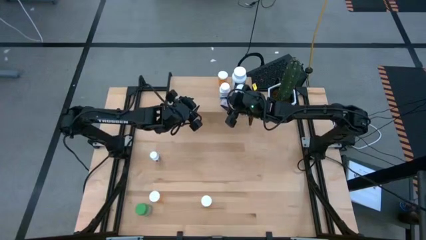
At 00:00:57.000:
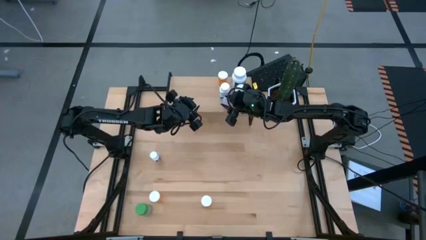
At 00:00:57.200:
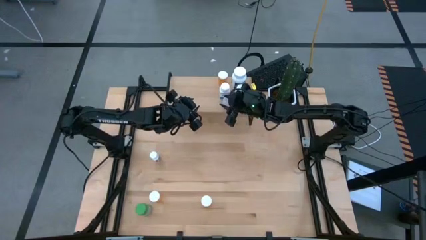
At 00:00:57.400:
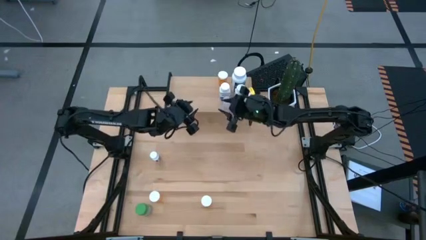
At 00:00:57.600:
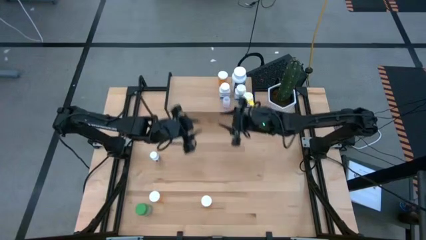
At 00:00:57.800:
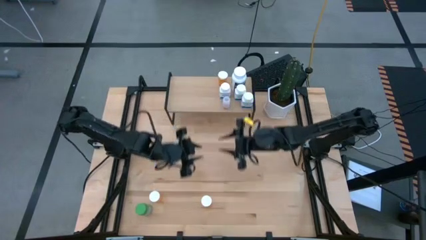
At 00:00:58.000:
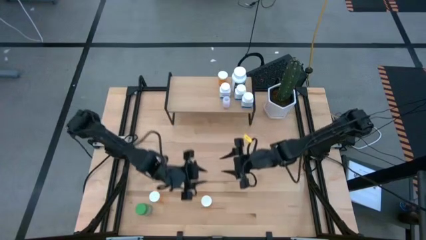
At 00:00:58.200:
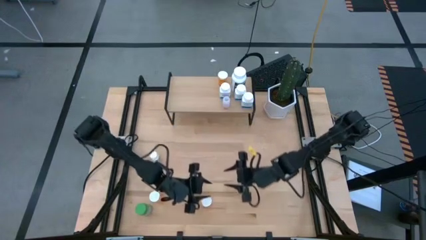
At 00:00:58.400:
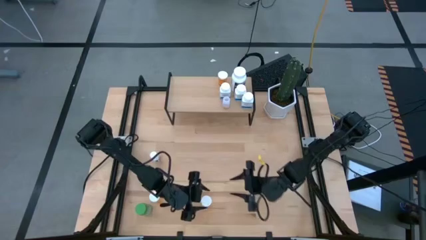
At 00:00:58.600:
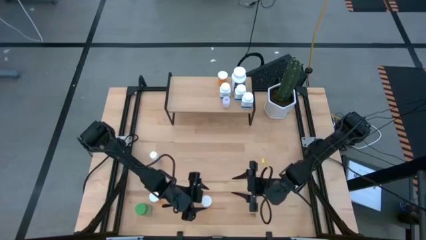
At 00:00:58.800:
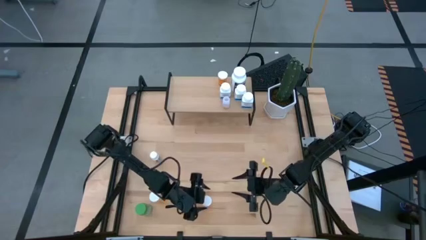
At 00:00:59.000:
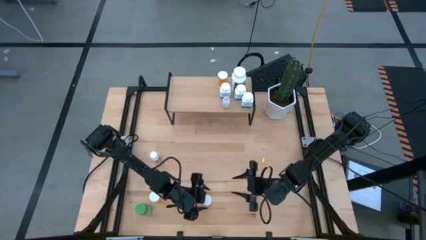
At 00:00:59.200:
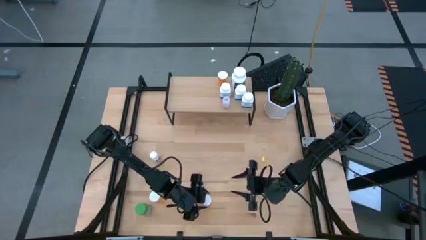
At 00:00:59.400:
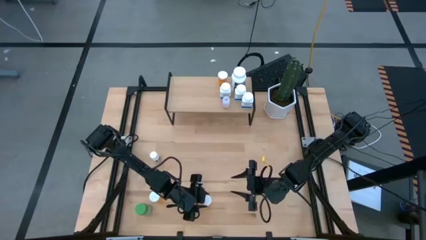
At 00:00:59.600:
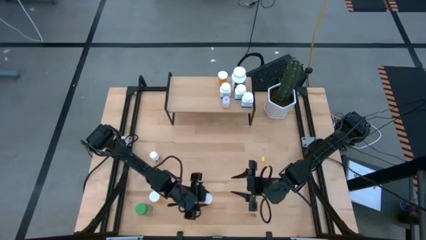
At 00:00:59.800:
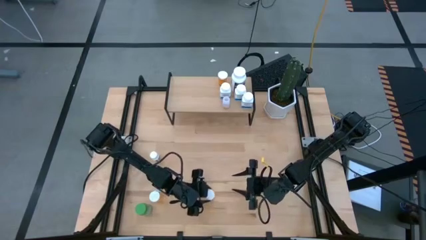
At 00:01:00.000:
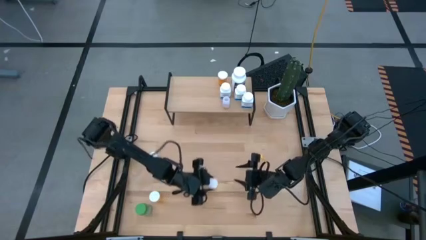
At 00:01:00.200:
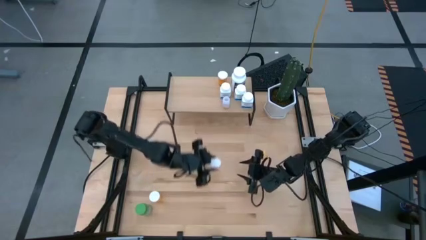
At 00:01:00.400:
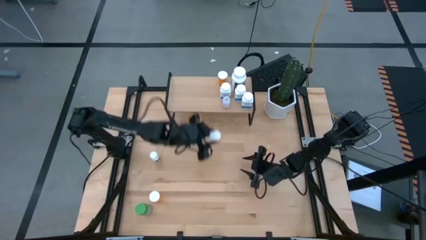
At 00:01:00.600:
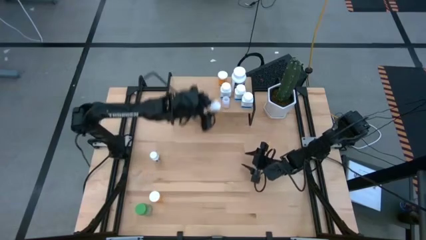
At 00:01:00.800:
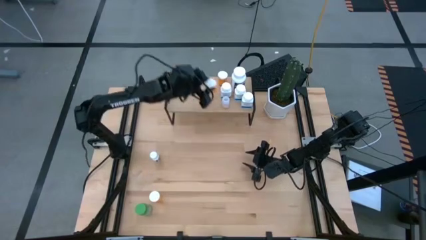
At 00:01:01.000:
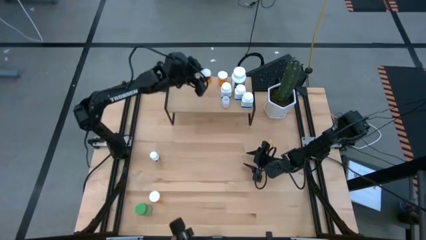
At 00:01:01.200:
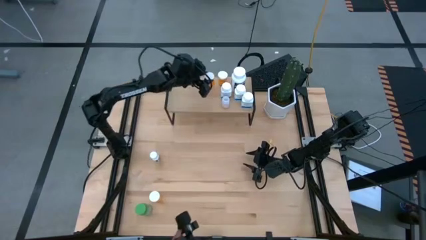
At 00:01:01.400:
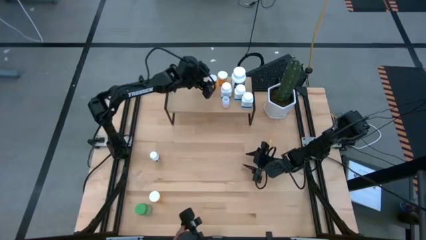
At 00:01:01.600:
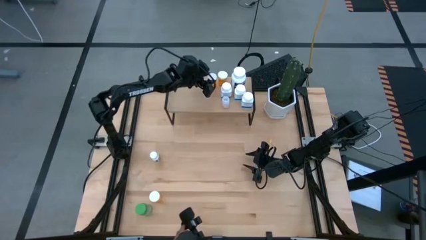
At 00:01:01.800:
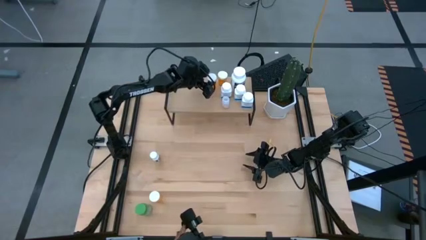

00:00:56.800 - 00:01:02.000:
Task: Pick and place medicine bottles onto shelf by color
Put the right orange pill bottle on the shelf

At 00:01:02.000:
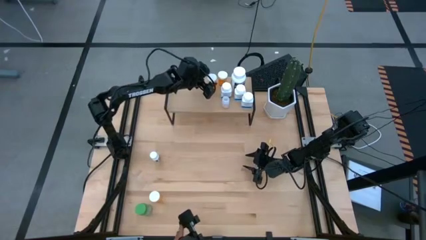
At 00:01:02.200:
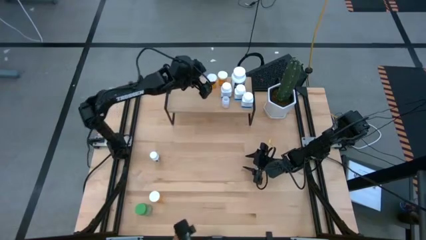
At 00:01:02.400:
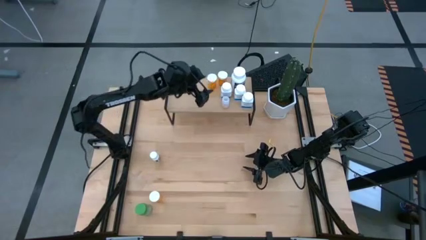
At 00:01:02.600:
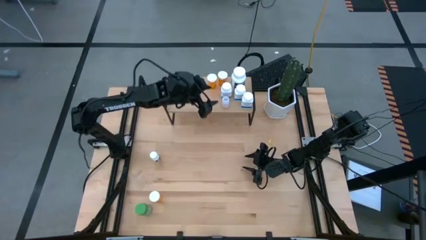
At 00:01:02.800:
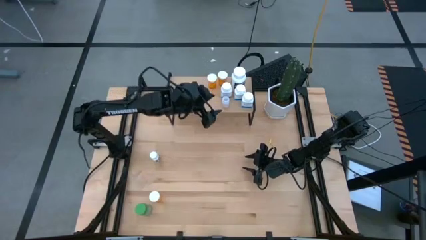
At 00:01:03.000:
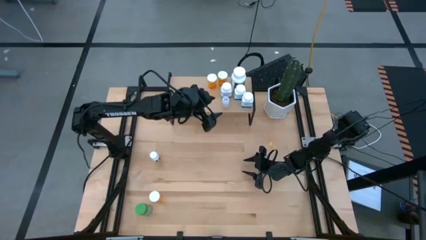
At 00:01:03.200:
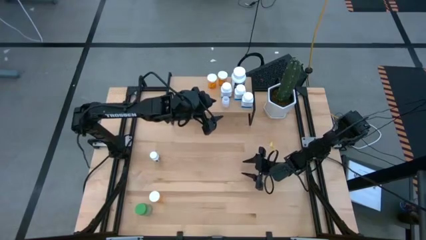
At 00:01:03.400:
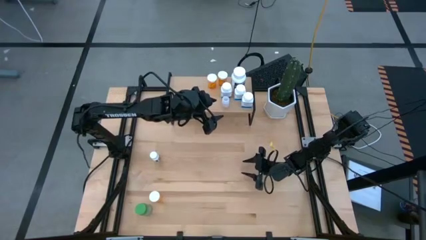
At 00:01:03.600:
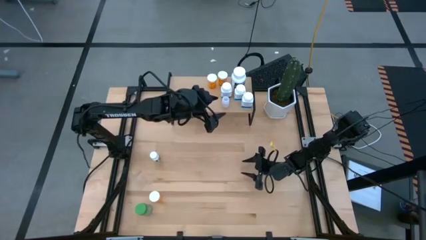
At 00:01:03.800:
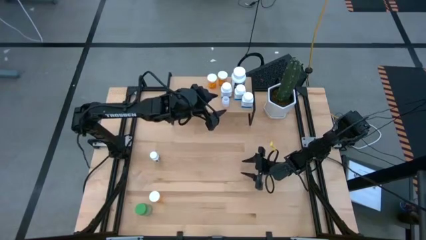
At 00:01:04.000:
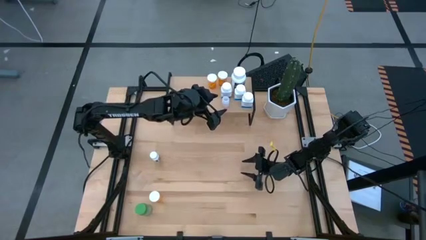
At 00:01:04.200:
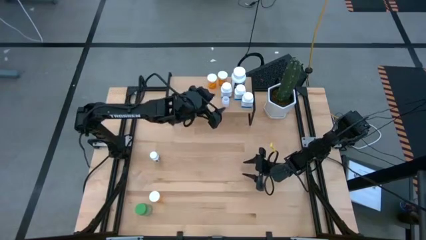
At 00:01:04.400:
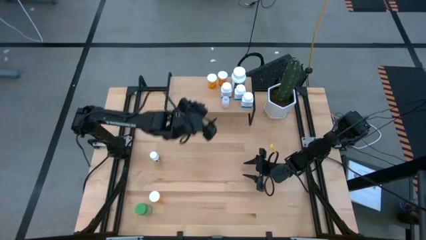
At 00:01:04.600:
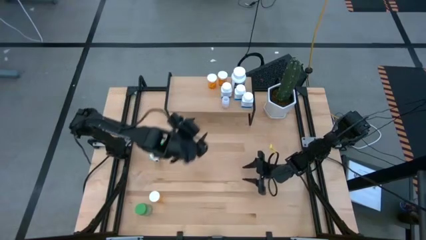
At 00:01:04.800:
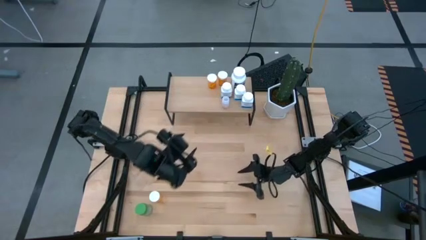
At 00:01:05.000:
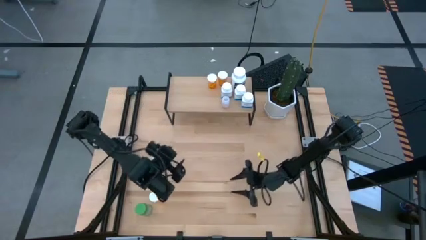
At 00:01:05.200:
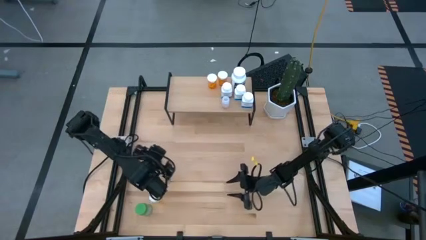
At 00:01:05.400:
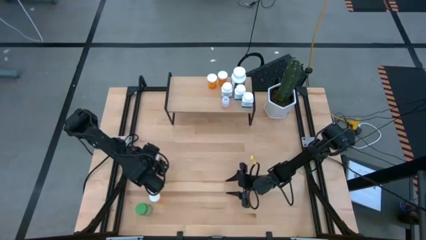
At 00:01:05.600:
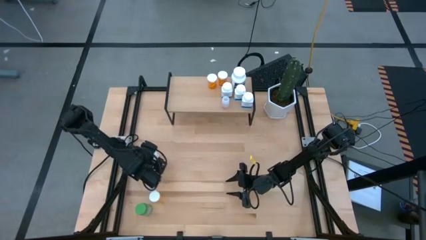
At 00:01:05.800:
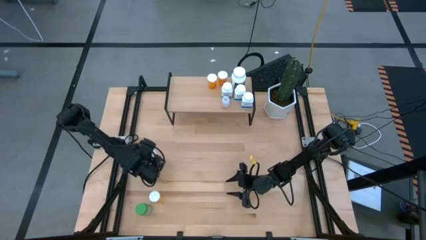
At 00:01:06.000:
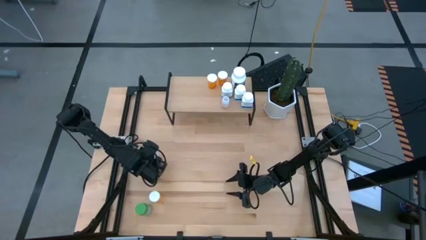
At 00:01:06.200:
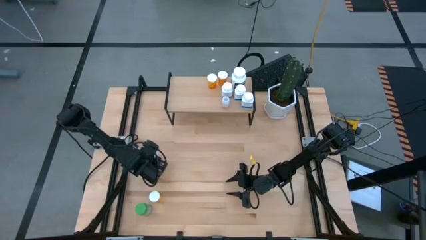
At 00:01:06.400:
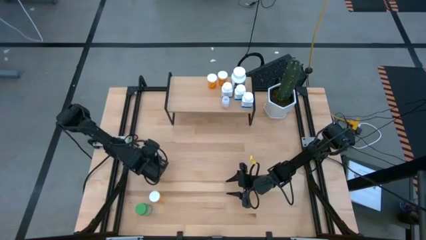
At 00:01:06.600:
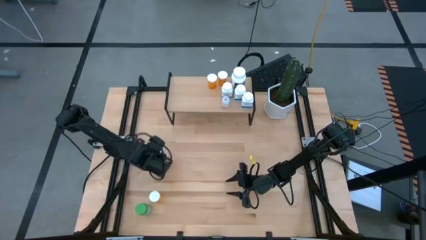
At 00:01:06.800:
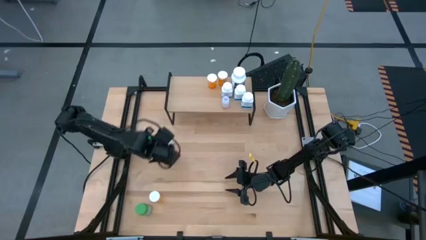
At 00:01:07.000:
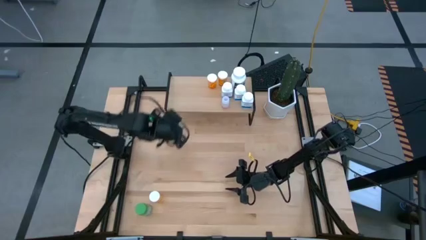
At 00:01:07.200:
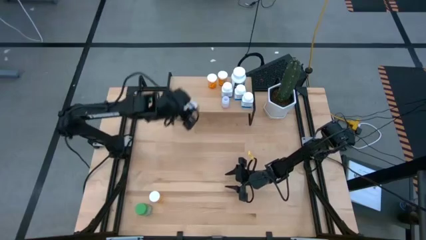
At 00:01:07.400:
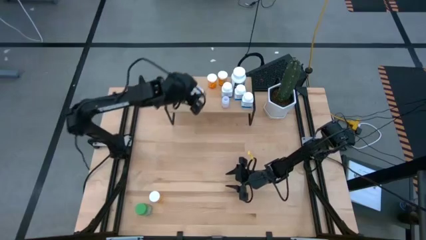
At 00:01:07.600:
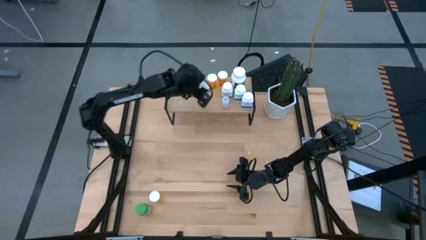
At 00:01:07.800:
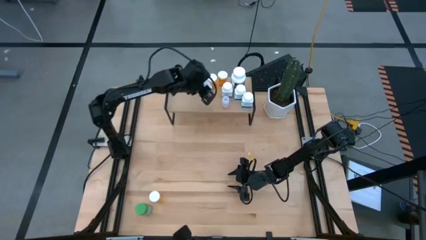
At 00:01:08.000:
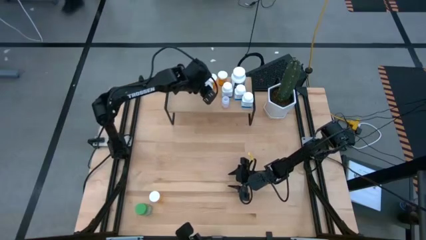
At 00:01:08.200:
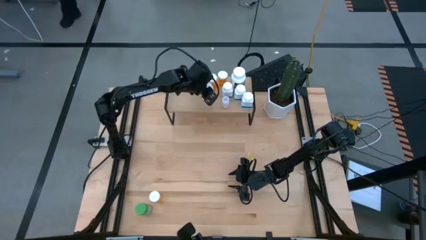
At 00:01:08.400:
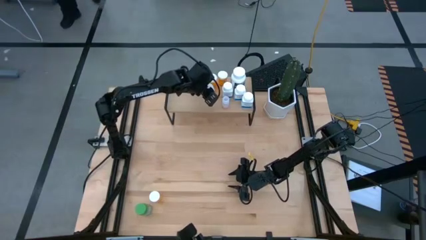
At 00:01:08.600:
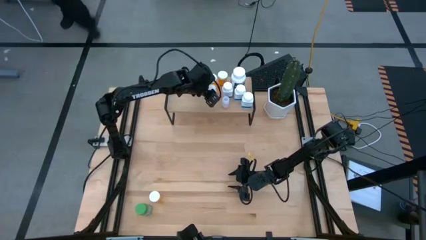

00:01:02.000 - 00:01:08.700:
Put the small white pill bottle on the shelf

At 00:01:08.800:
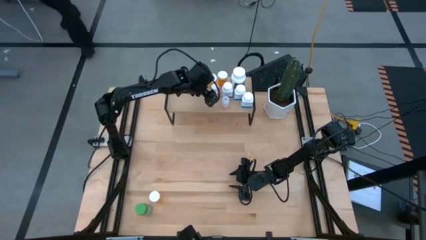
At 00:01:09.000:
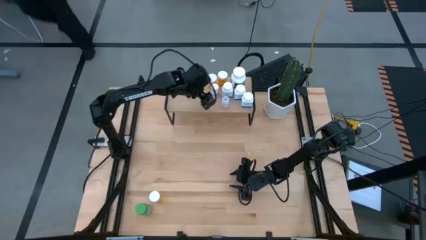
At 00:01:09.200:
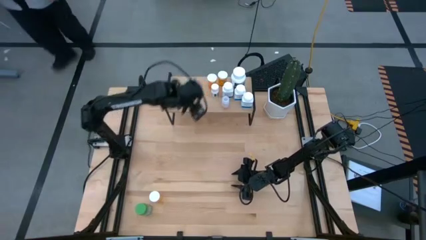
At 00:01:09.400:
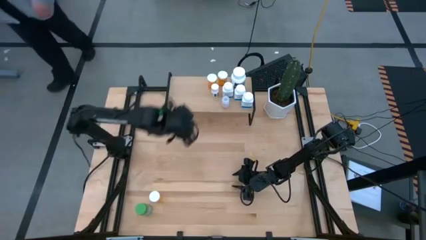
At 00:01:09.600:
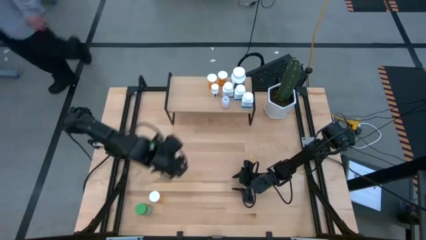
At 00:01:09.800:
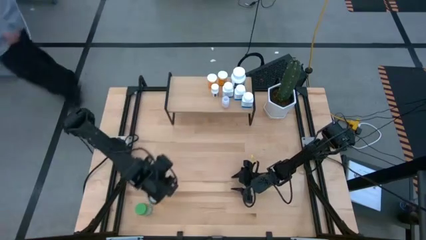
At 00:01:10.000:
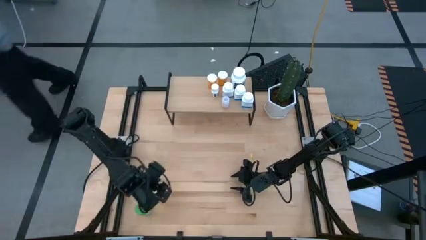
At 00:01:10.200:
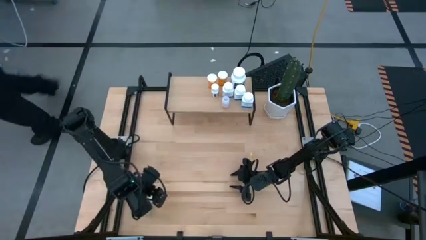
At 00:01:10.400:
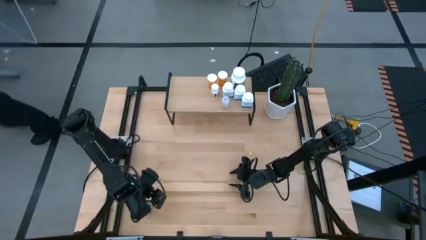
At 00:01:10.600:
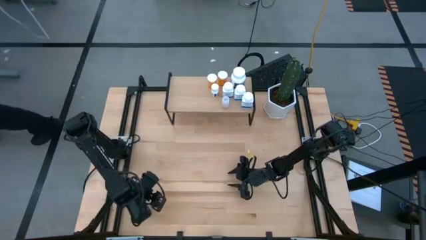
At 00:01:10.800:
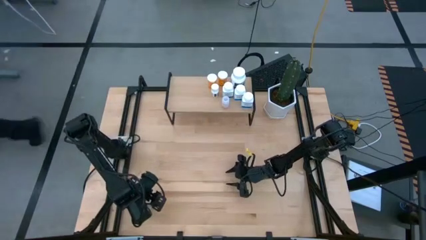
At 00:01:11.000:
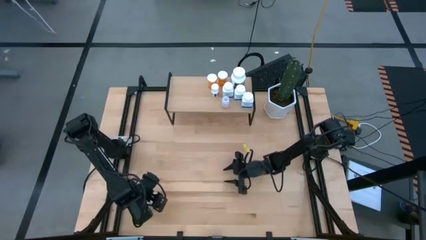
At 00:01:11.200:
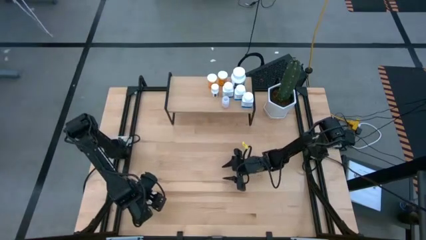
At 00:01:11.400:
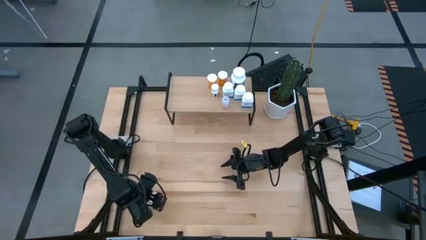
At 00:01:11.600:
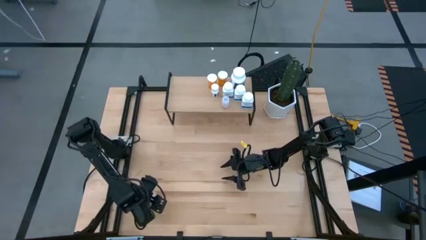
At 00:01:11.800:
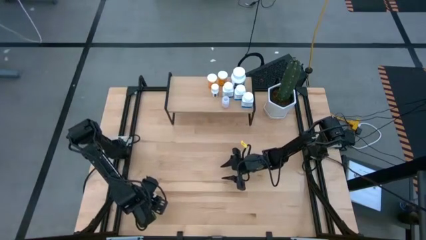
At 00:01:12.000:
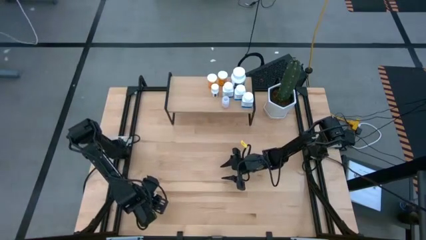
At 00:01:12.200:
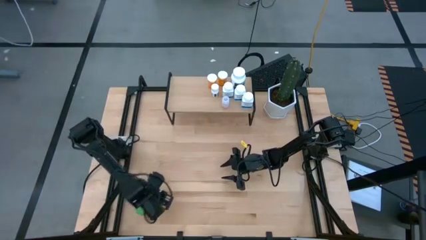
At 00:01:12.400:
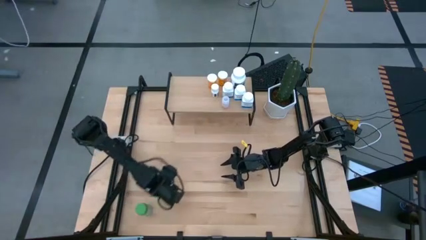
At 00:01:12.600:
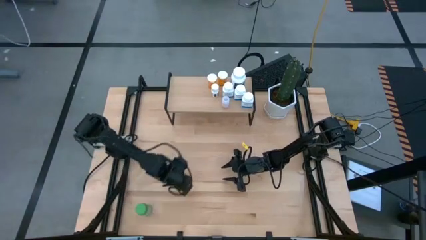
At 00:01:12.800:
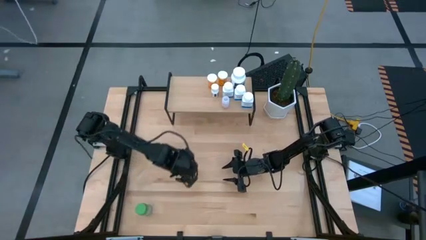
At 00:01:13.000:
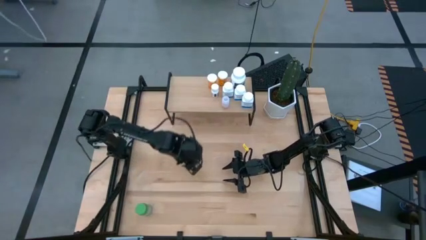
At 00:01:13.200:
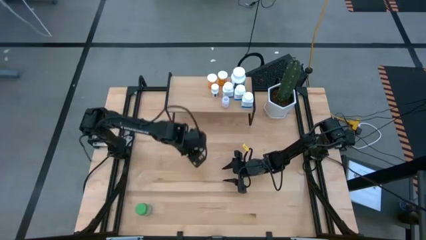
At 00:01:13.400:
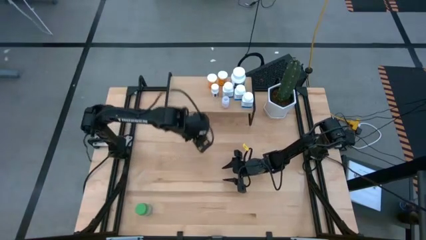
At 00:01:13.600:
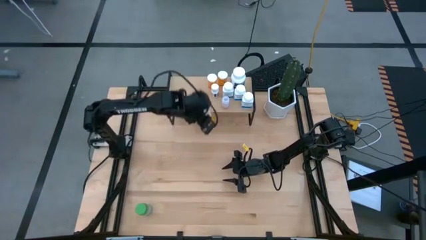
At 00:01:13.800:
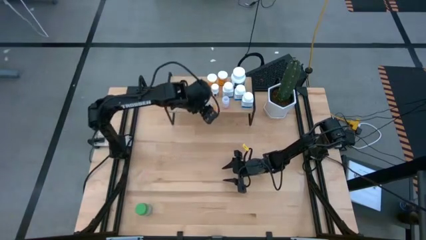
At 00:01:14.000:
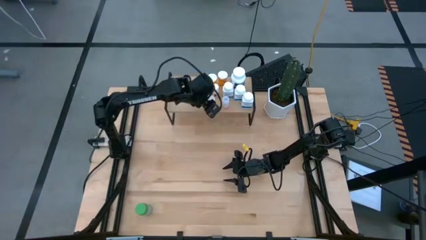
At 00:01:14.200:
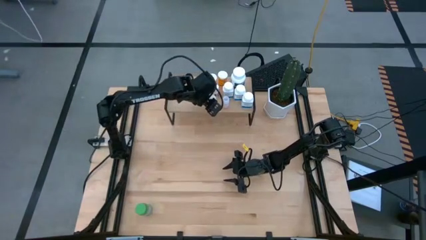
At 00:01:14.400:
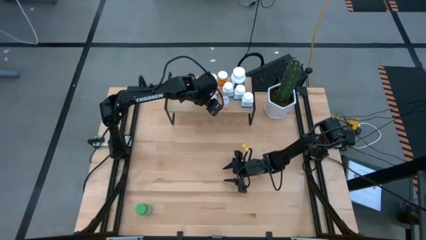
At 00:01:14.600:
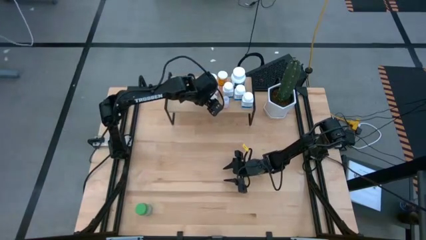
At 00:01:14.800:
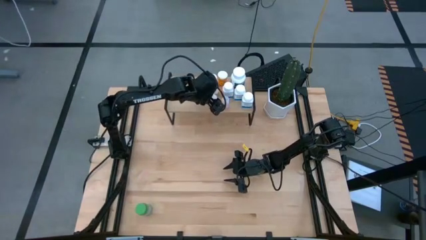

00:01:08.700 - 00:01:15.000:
Put the orange pill bottle on the shelf
